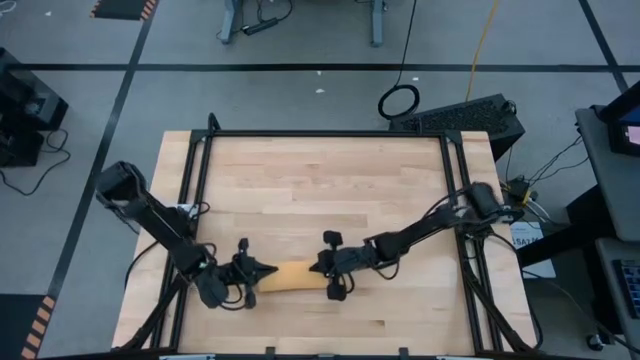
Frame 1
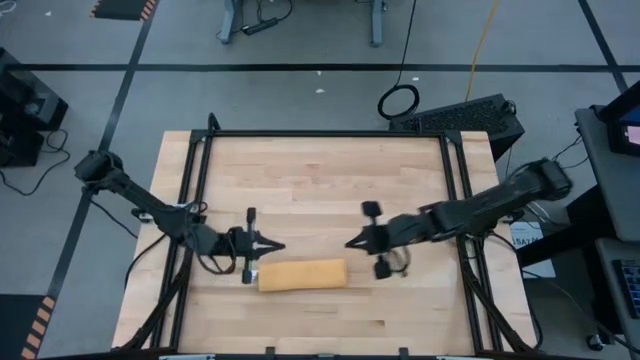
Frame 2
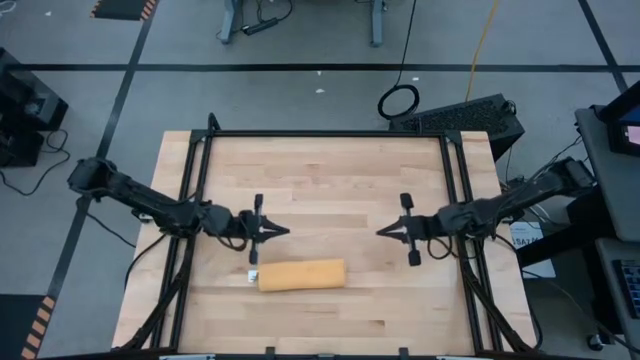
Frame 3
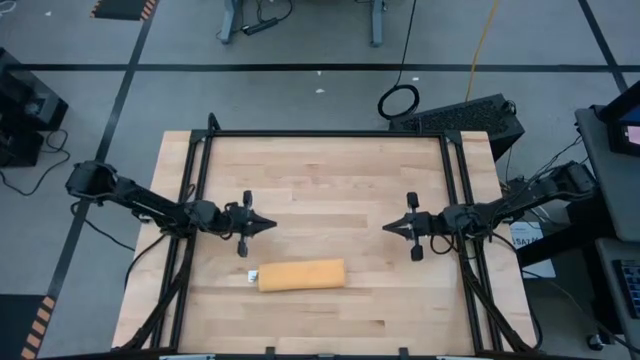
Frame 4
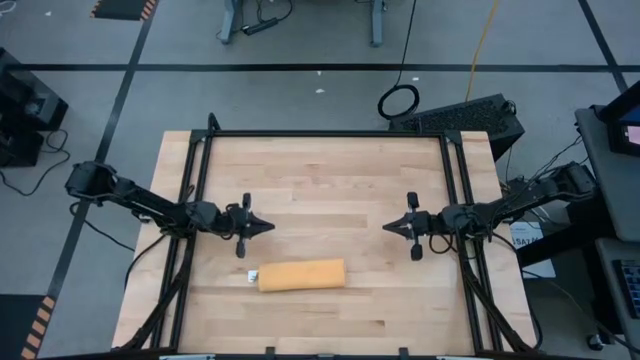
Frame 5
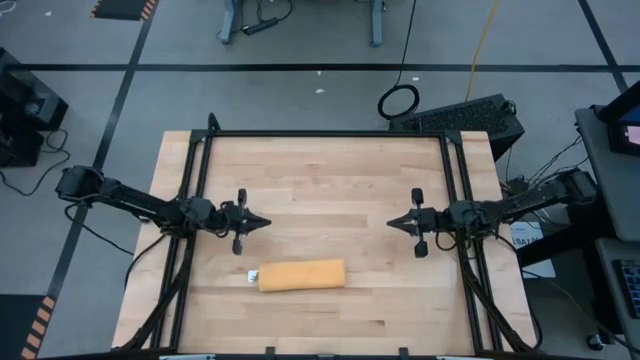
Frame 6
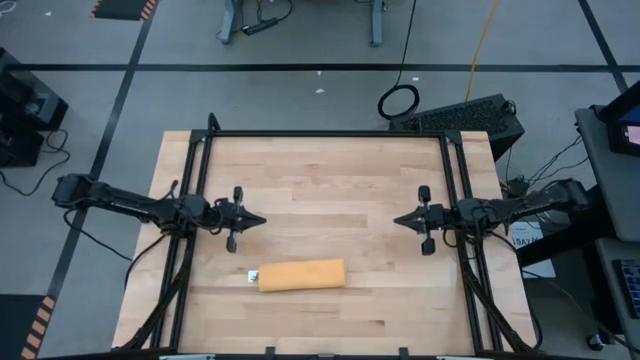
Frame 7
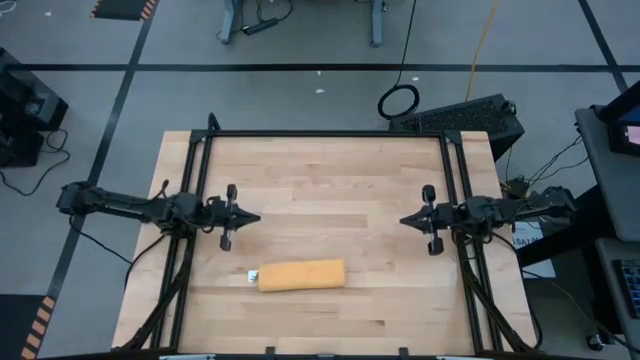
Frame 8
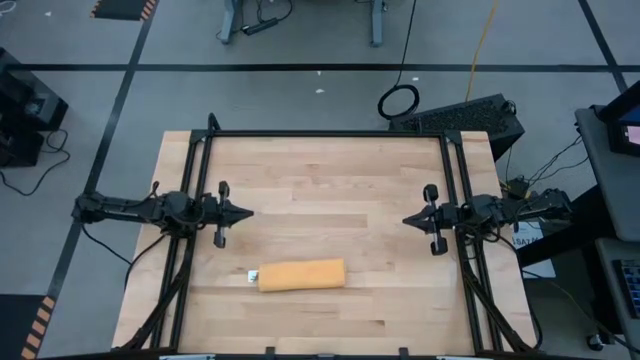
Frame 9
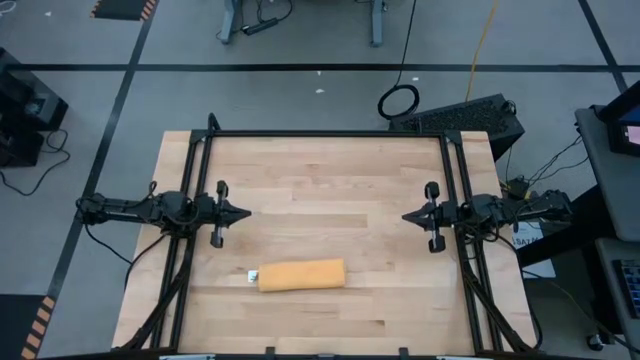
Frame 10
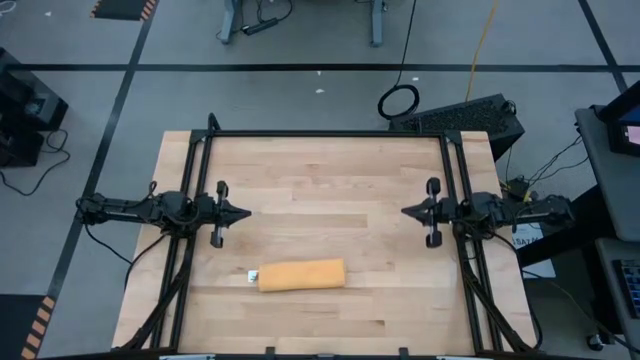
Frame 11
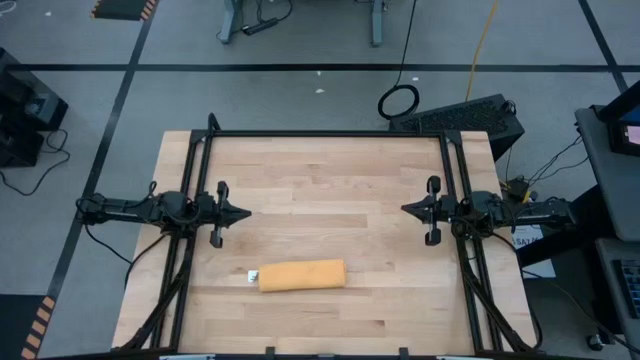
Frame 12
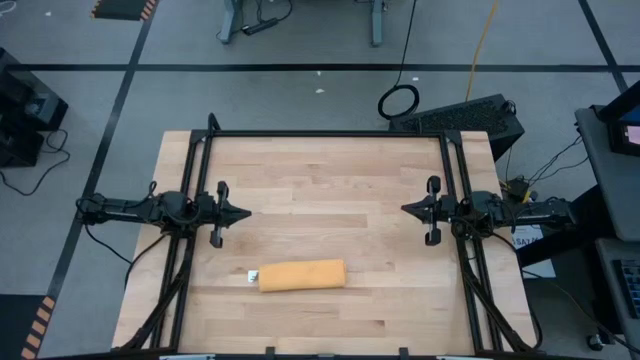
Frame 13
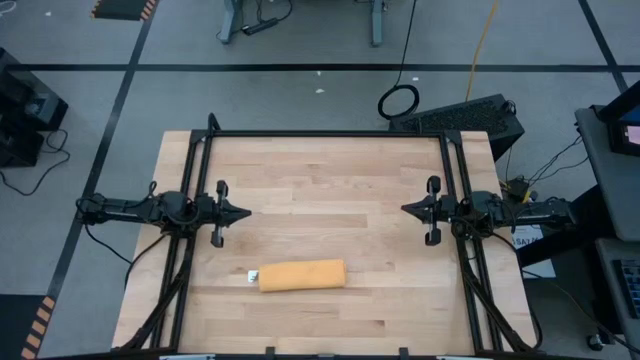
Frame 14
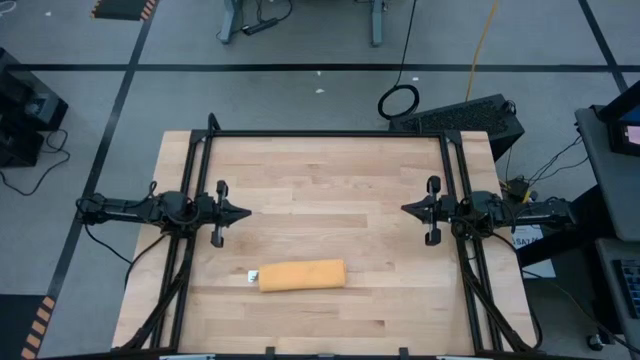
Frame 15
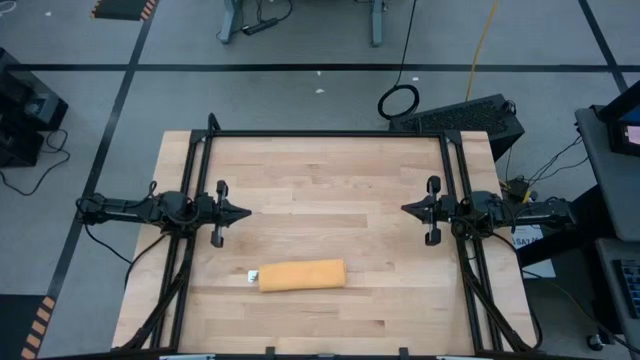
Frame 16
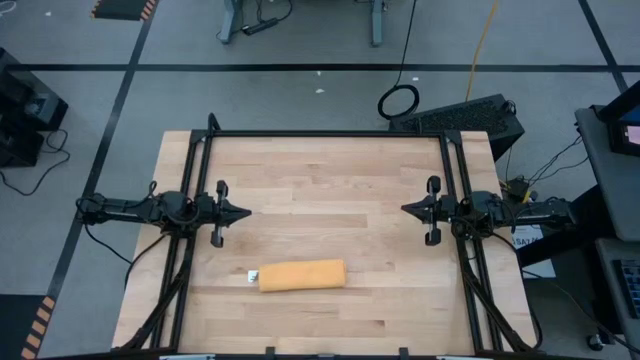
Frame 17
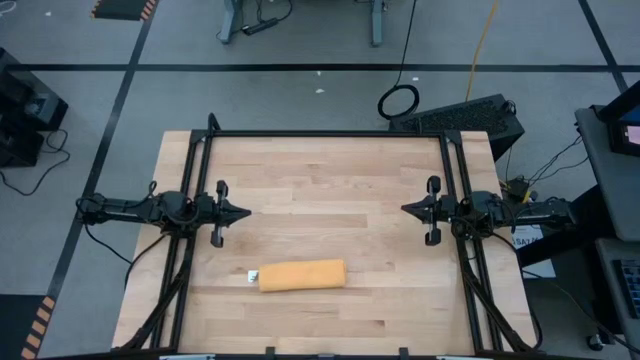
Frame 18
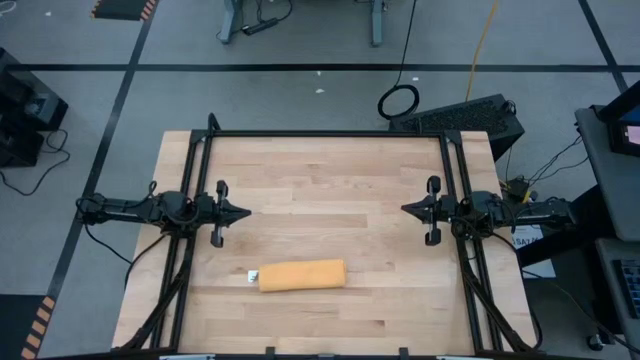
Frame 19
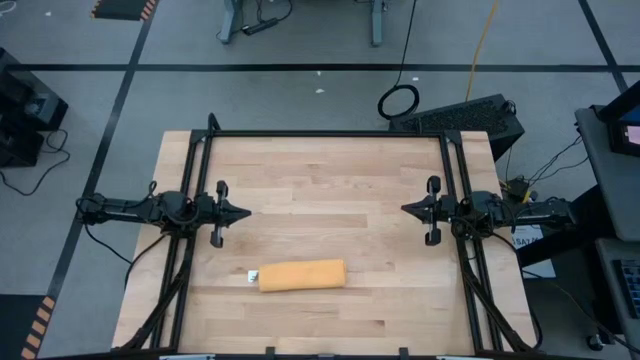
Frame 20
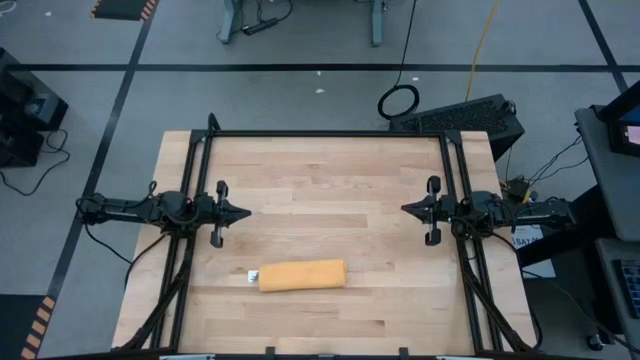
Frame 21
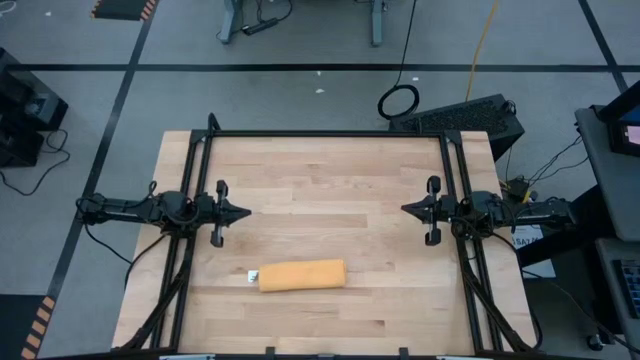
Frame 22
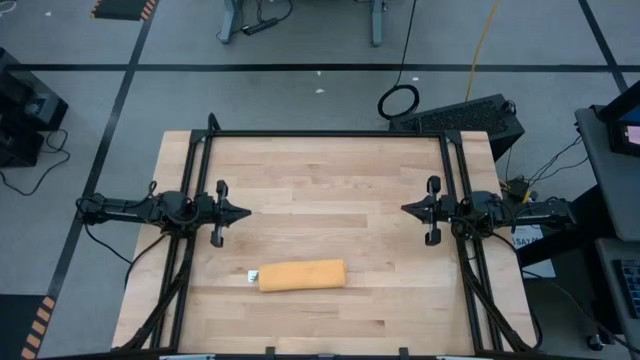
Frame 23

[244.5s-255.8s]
Task: Roll towel
Return to Home Position

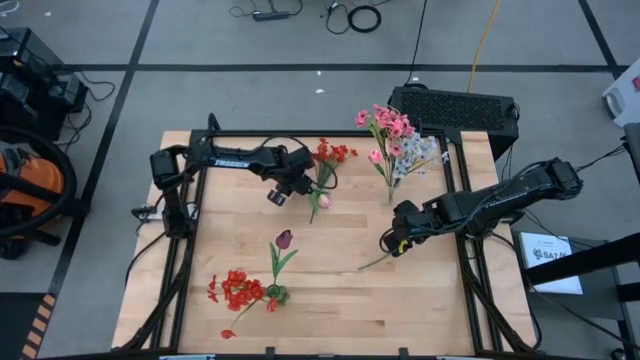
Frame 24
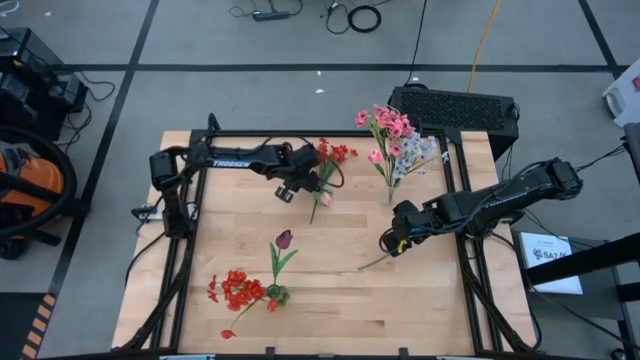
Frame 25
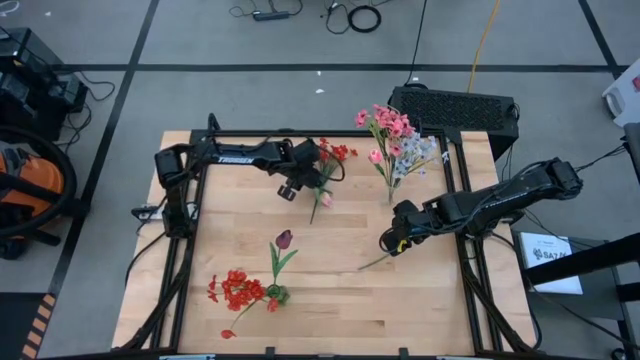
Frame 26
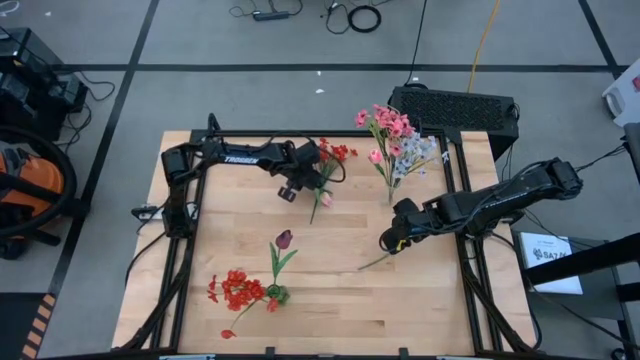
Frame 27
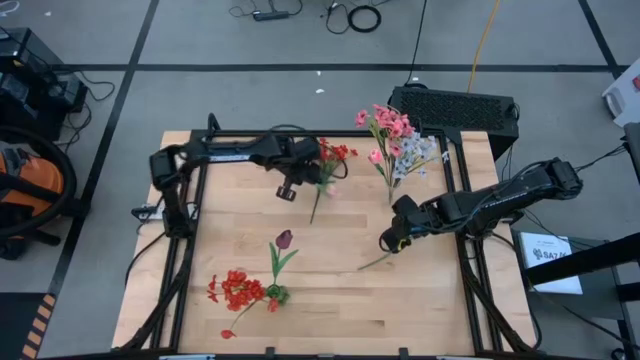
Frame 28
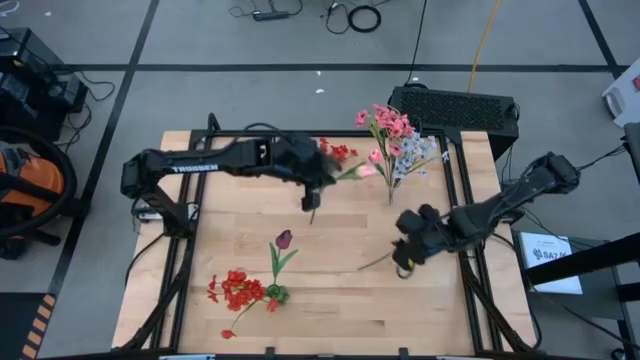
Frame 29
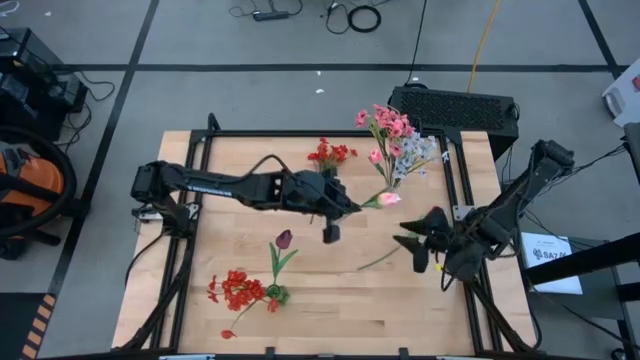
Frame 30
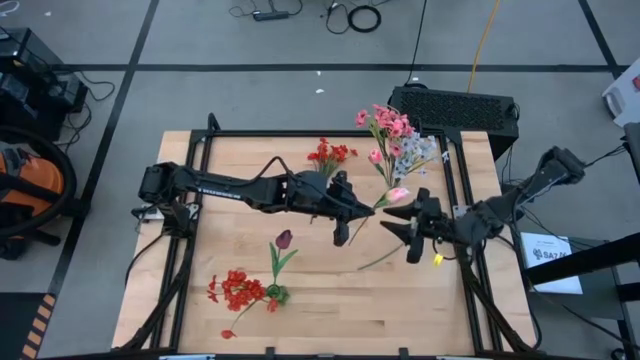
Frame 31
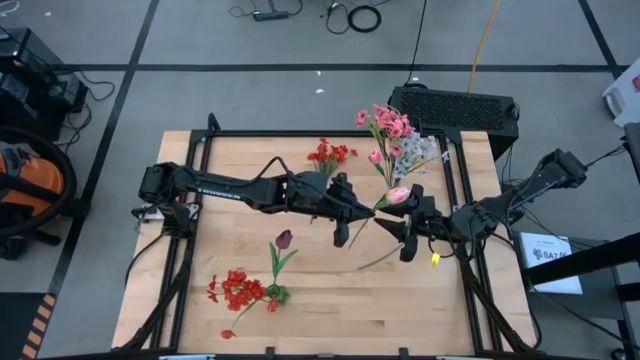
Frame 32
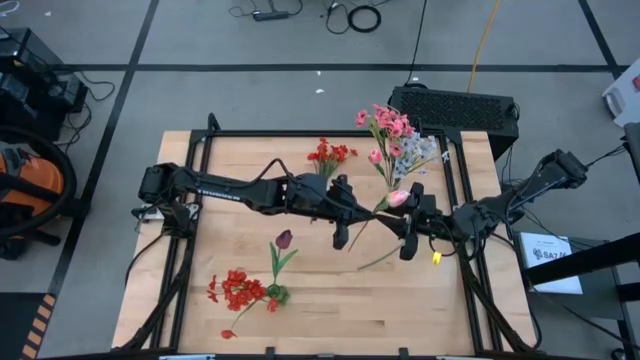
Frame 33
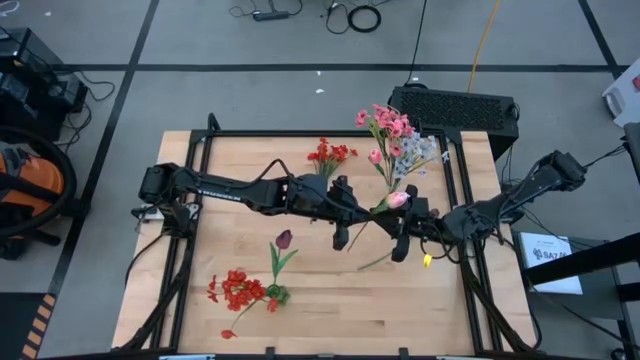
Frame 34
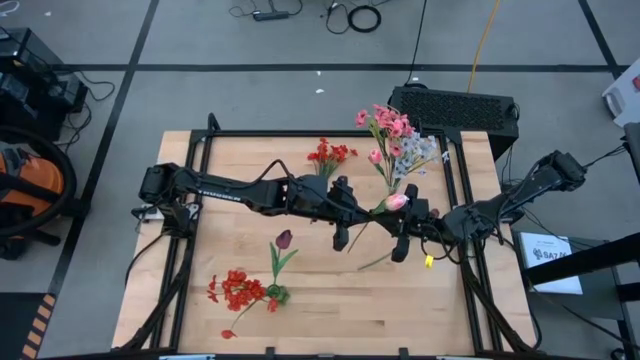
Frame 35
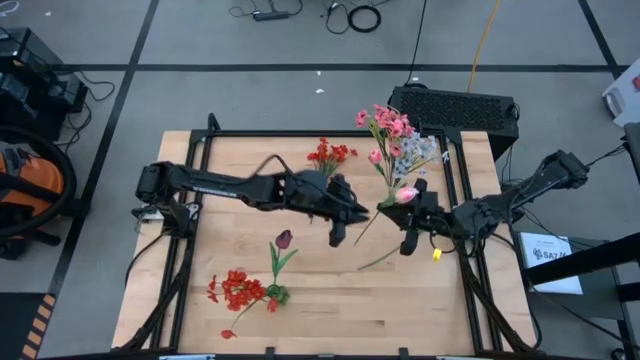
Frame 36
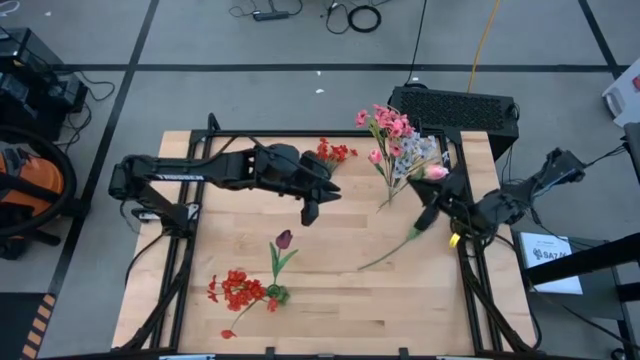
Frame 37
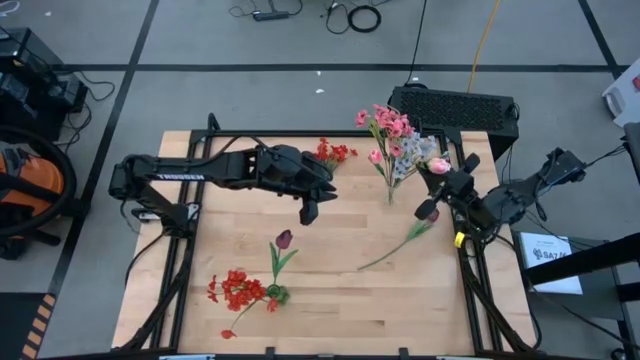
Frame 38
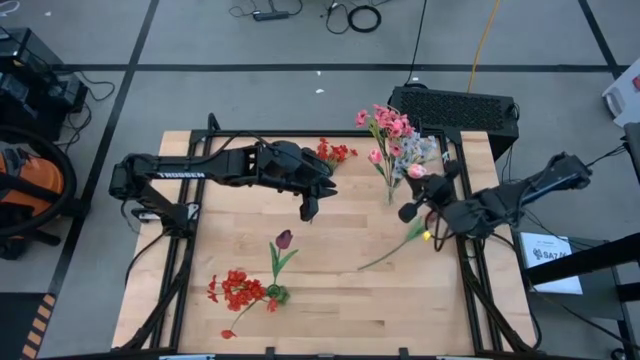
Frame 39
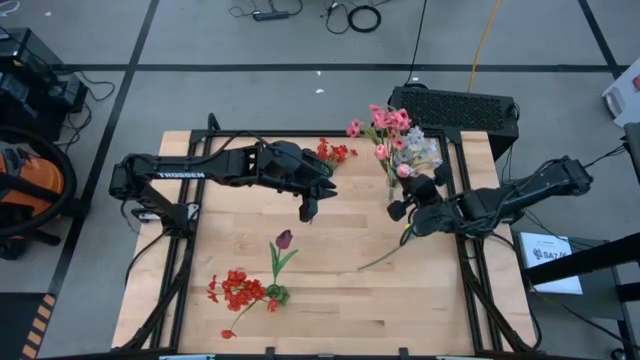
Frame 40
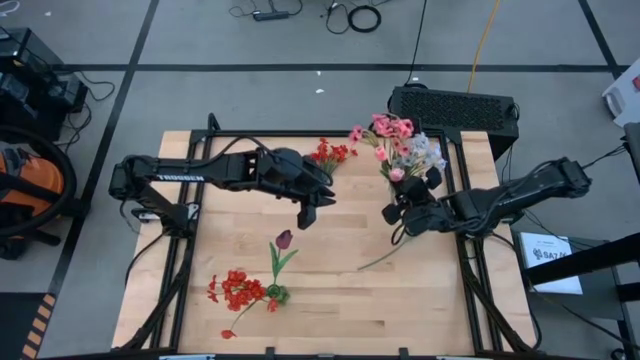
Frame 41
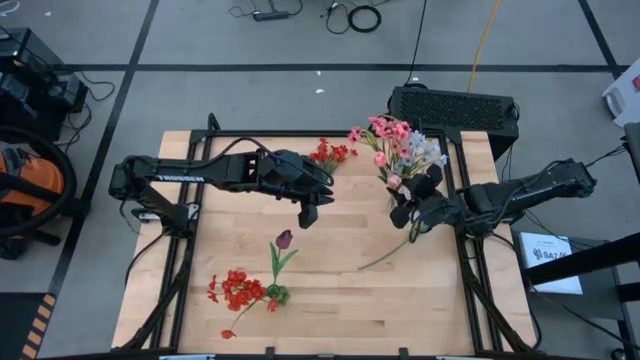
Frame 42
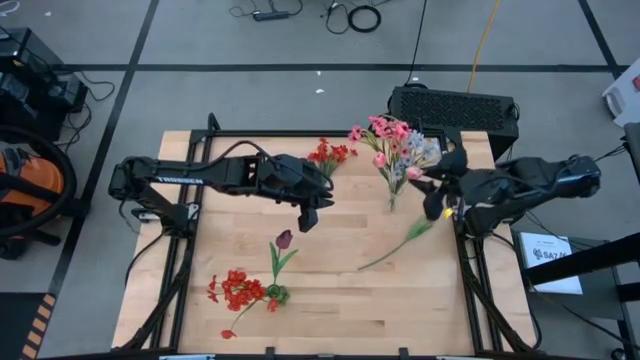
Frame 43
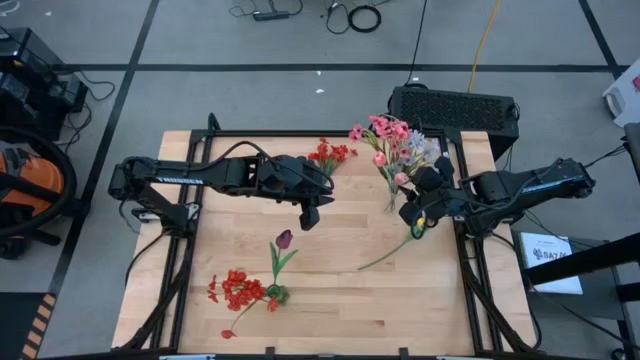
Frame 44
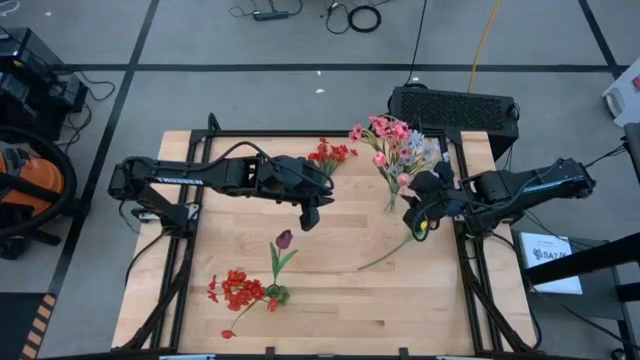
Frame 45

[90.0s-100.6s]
Task: Sort flowers into vase by color
Put the pink flower into the transparent vase
